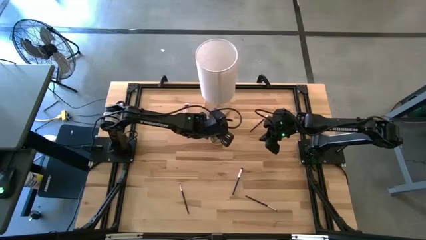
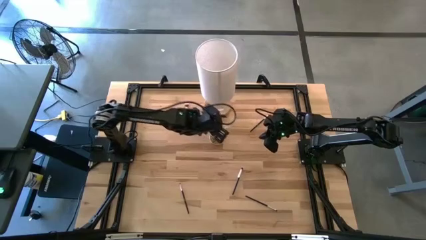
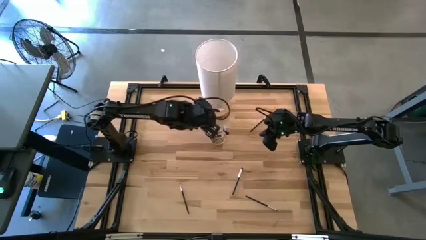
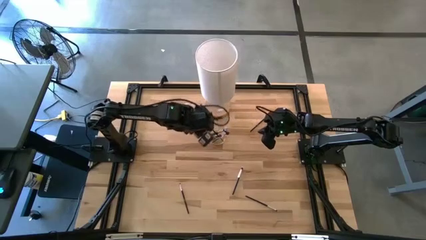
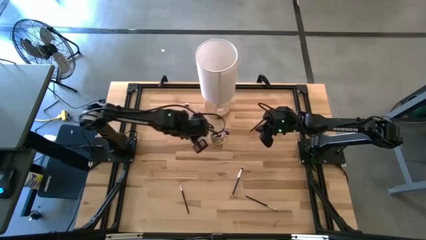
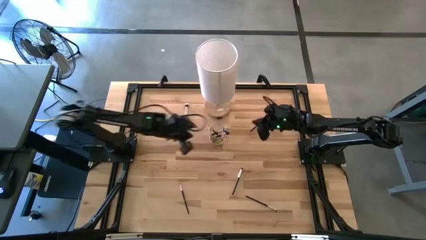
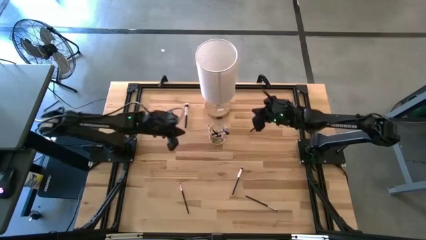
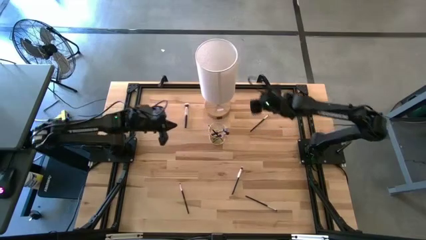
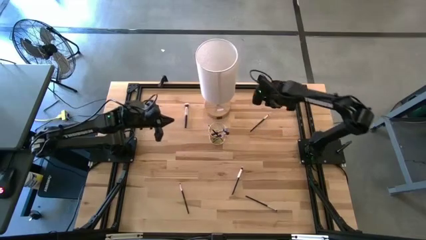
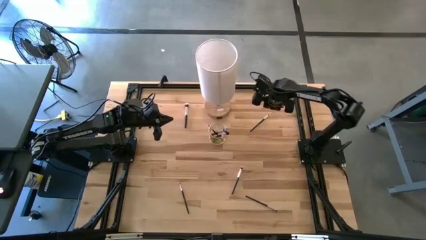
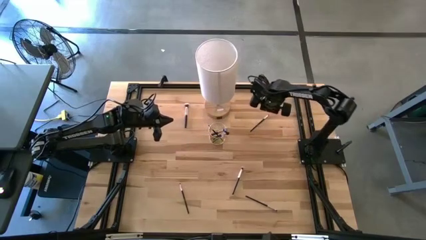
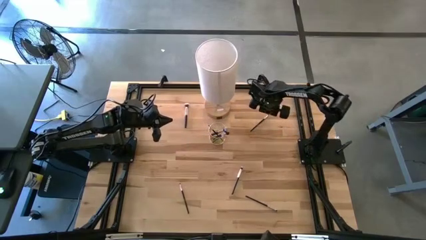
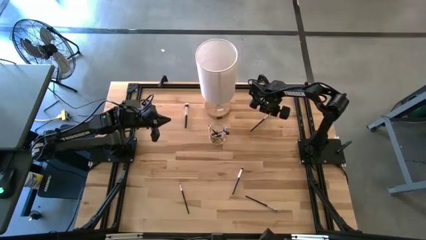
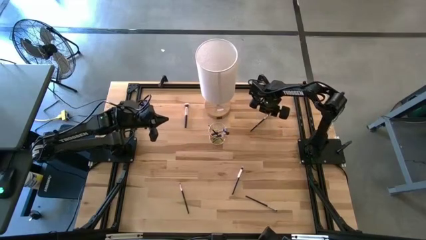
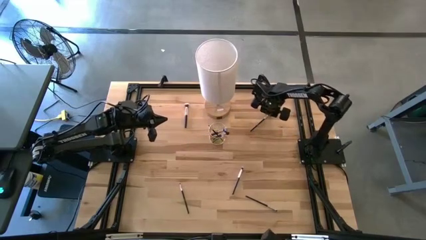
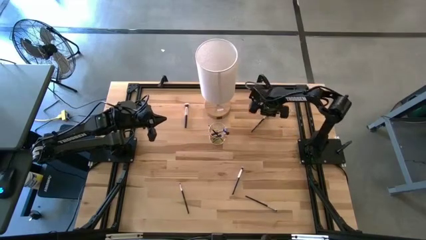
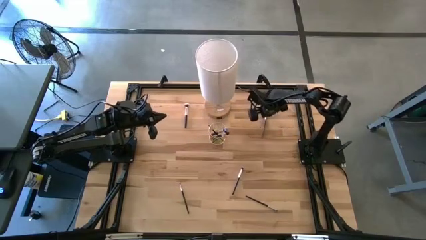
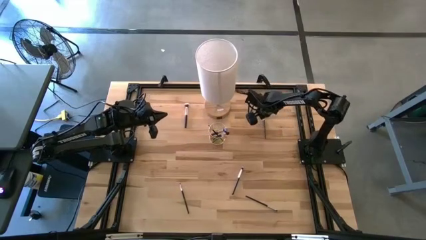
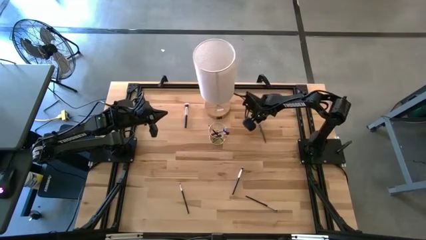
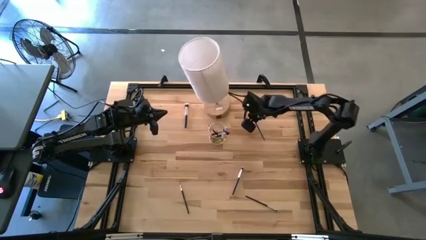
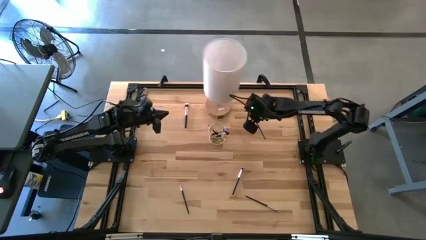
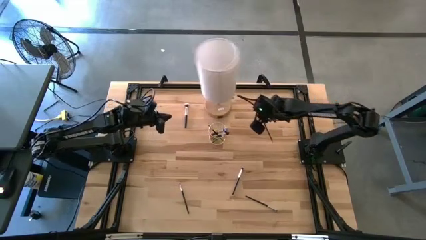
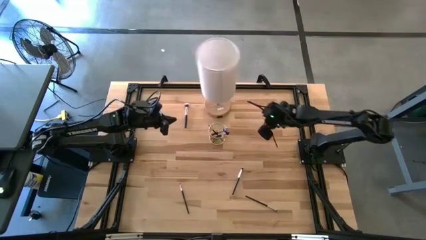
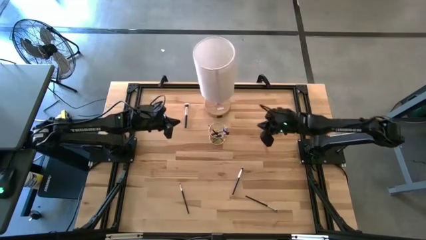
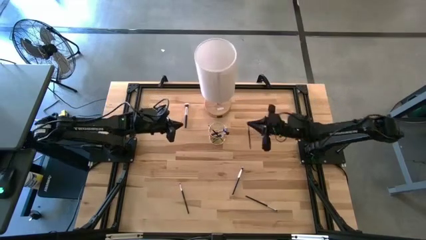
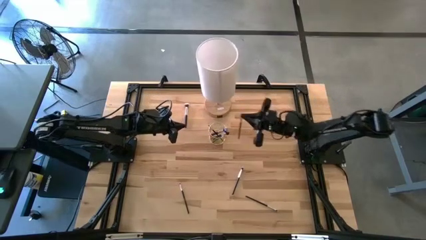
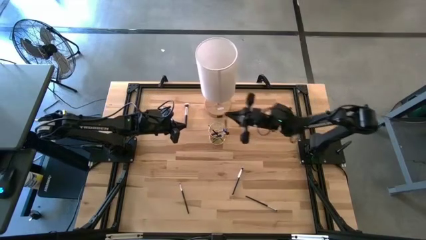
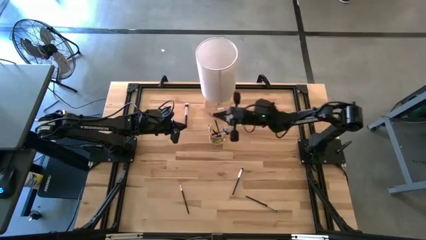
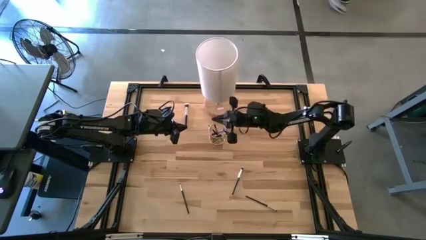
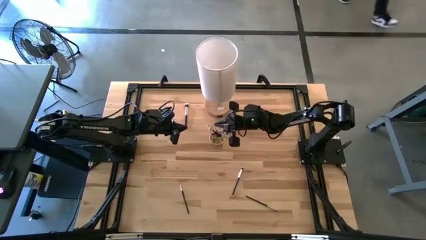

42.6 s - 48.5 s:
Task: Put items in baskets/containers
Put the black eyeshadow brush into the gold pen organizer

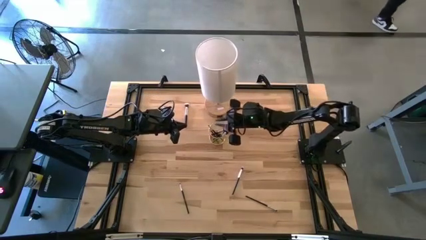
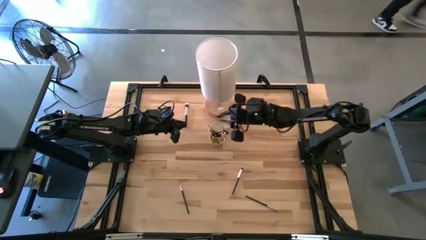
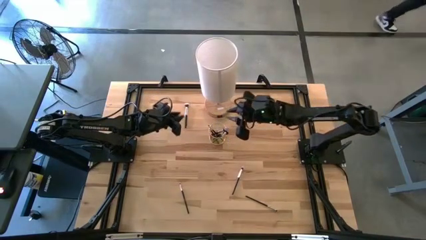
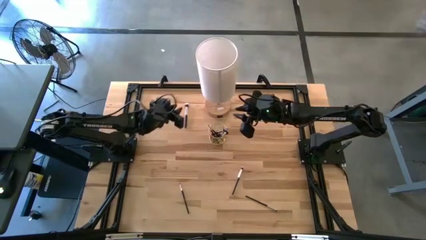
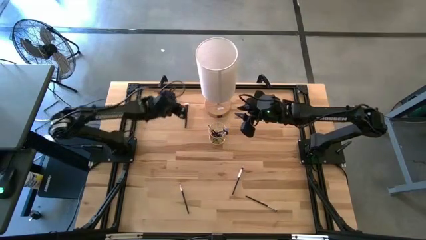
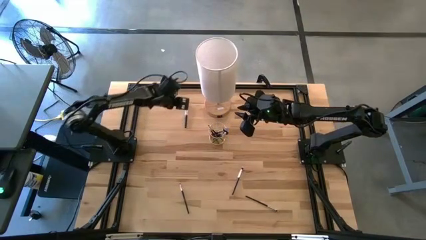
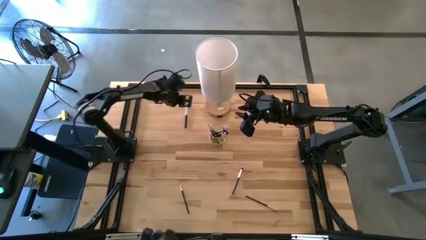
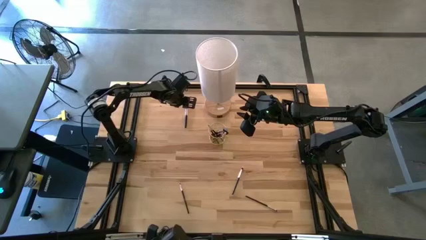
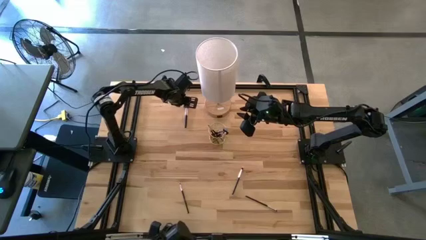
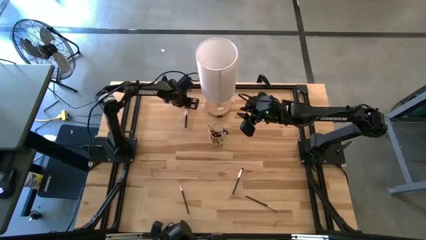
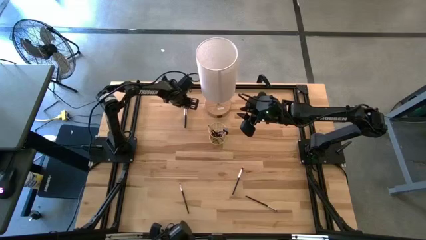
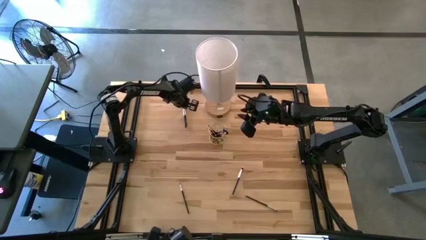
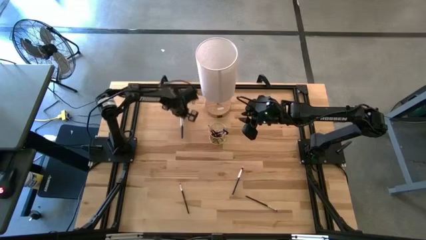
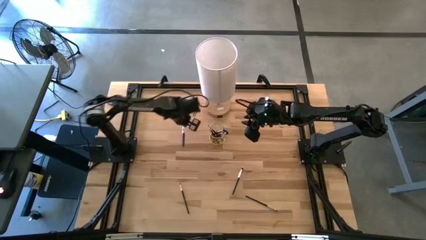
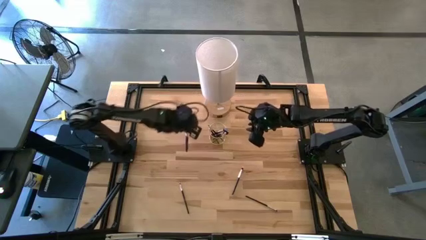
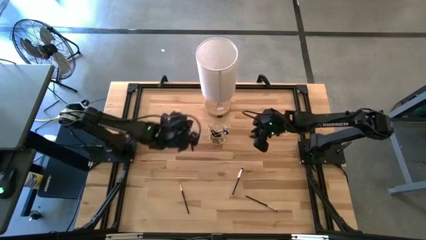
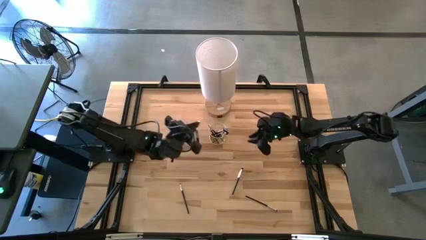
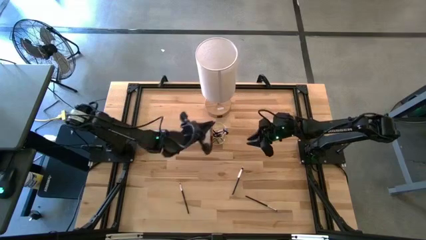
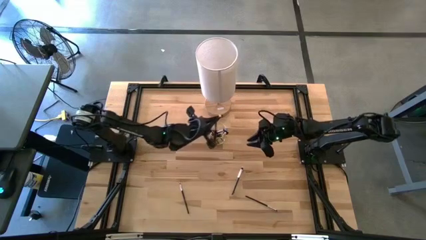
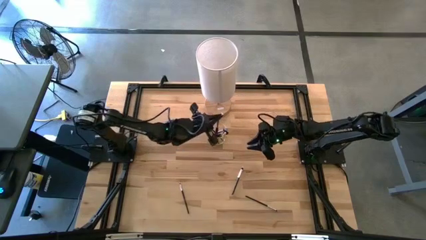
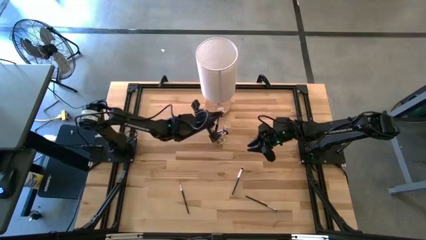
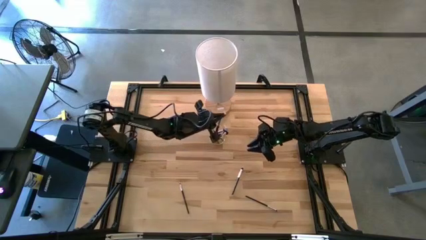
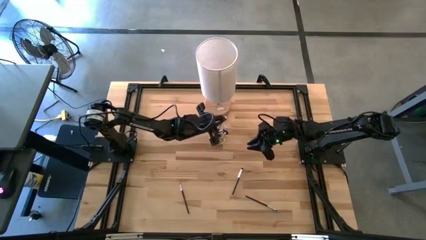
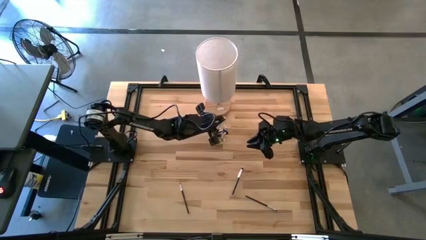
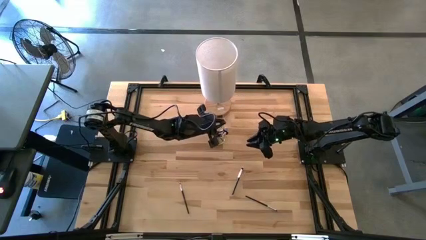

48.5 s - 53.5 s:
Put the black powder brush into the gold pen organizer

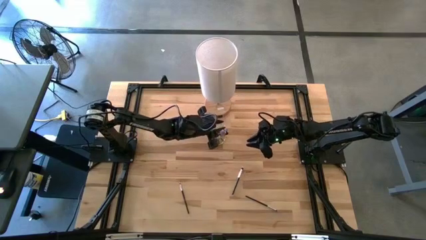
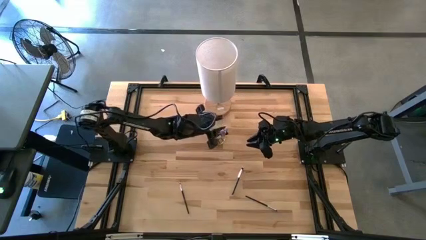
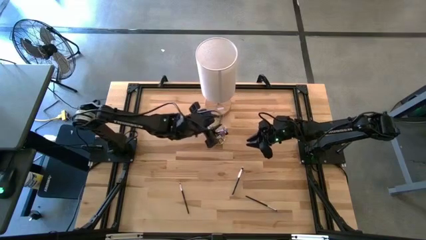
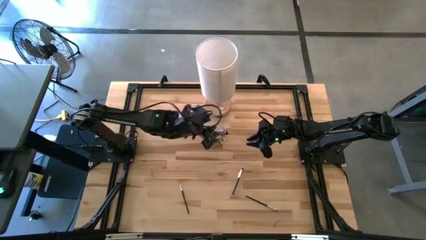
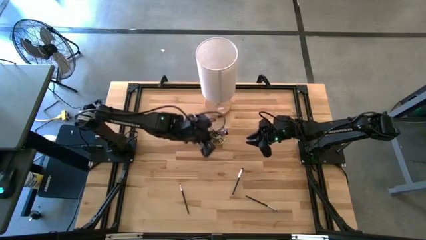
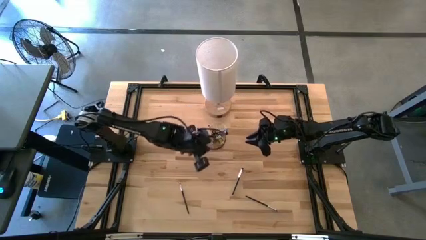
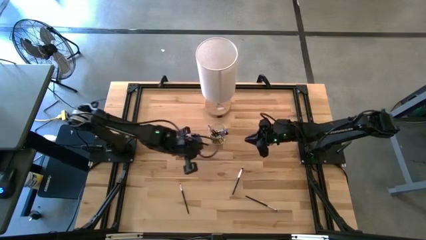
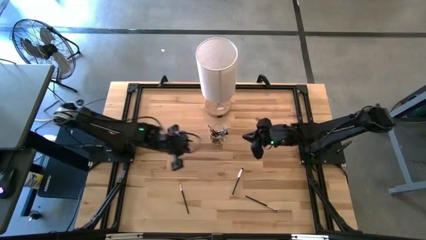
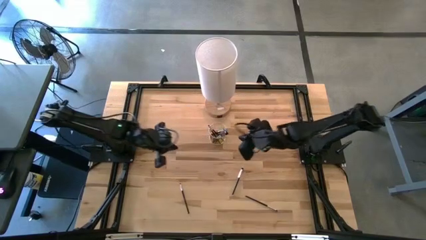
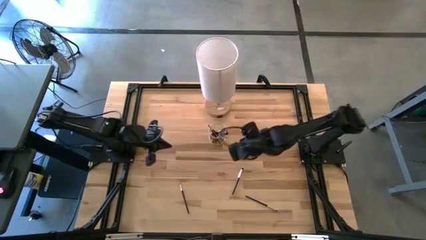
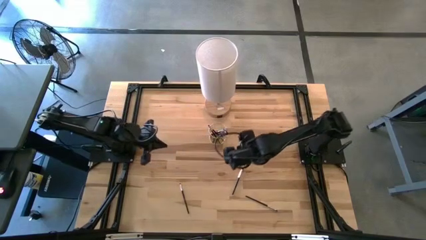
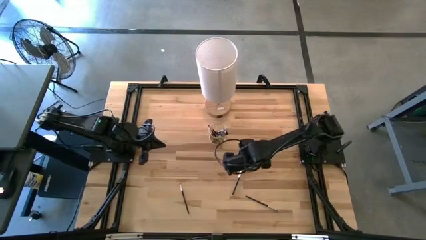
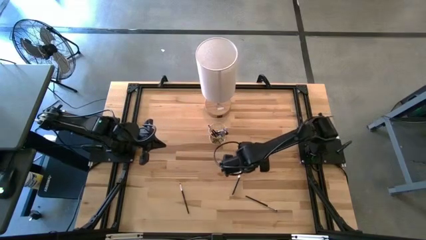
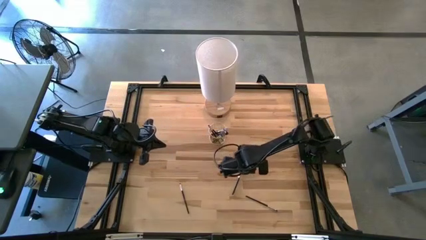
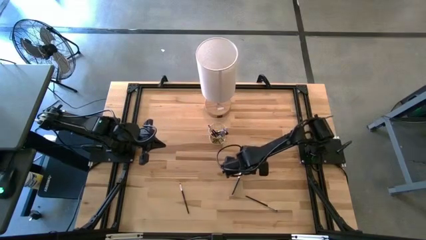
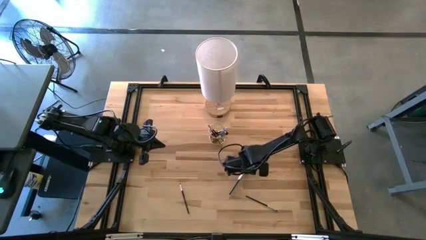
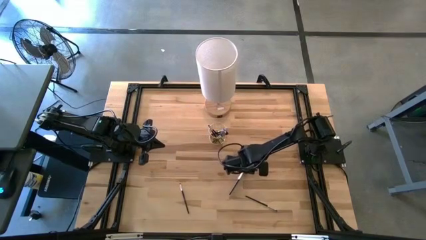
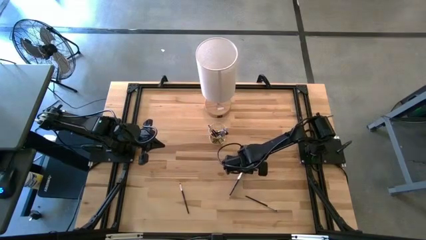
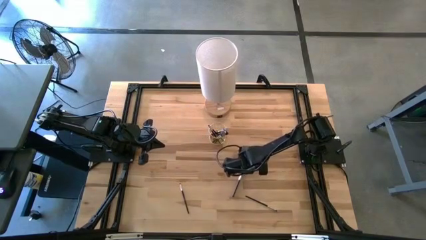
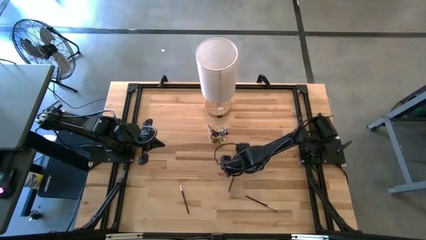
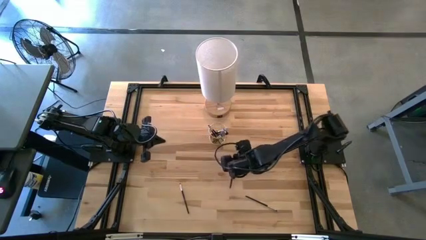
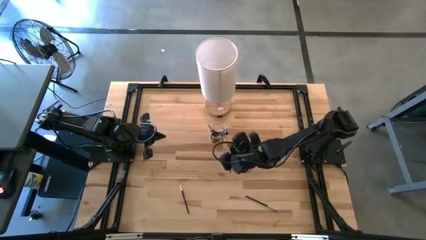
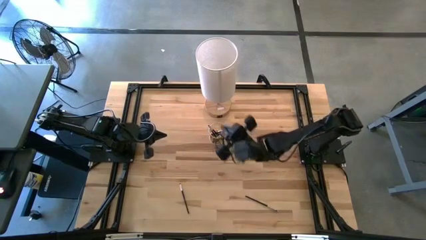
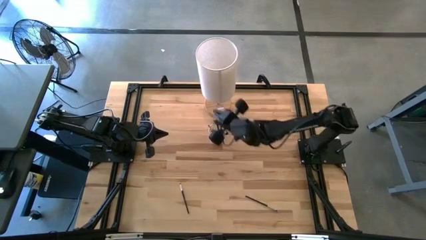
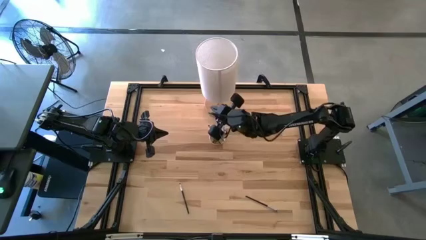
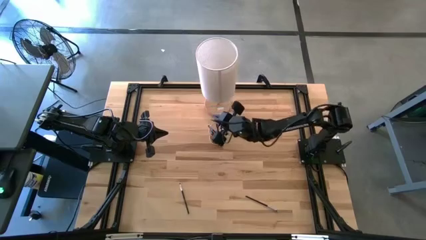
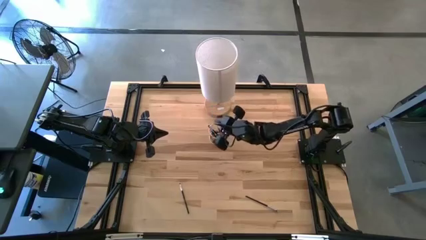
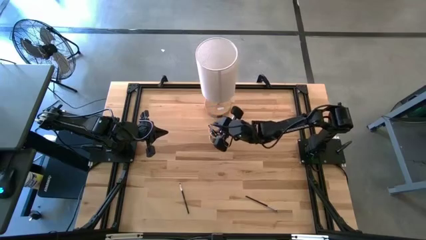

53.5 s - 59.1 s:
Put the black eyeshadow brush into the gold pen organizer
